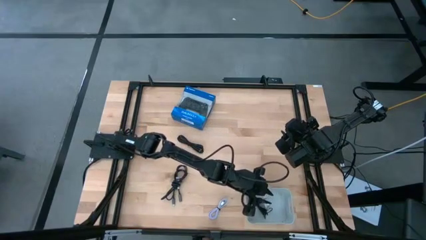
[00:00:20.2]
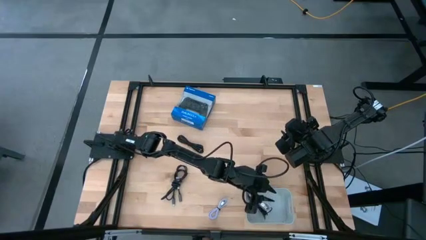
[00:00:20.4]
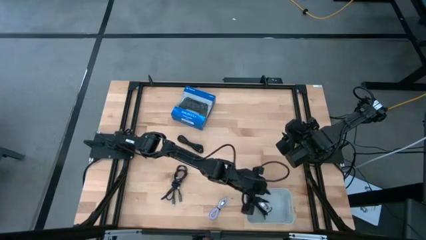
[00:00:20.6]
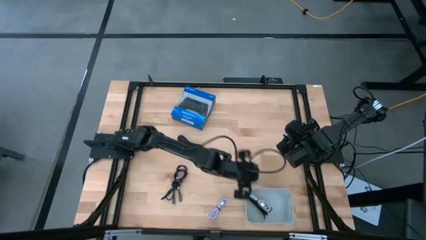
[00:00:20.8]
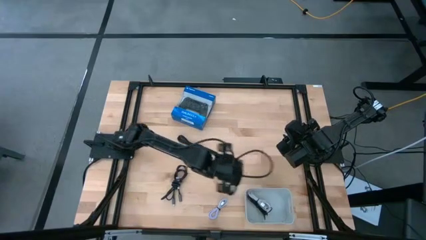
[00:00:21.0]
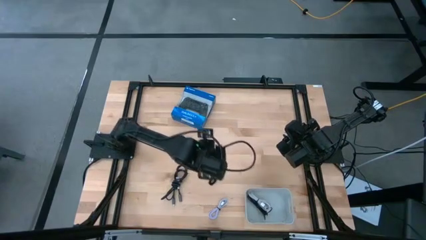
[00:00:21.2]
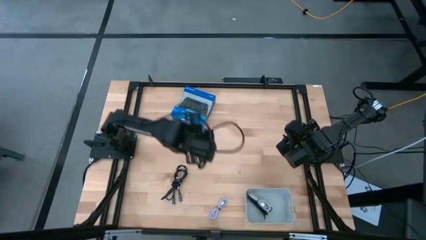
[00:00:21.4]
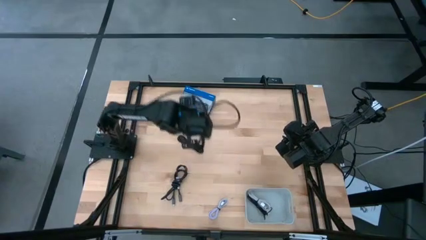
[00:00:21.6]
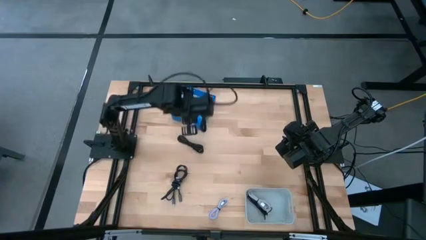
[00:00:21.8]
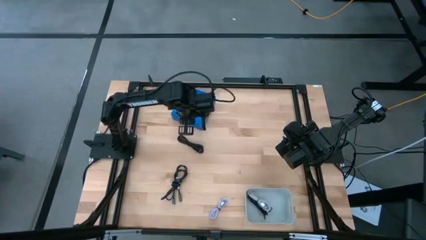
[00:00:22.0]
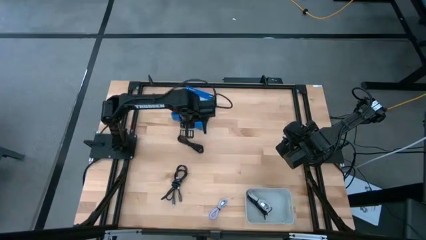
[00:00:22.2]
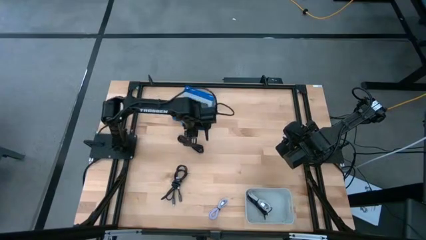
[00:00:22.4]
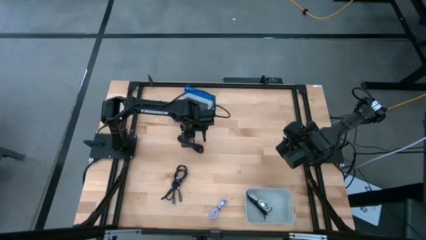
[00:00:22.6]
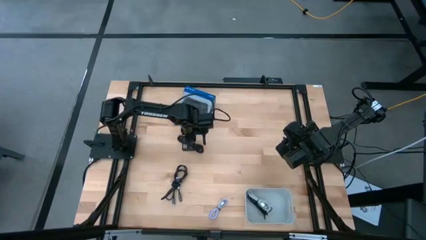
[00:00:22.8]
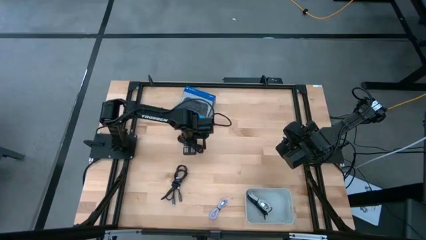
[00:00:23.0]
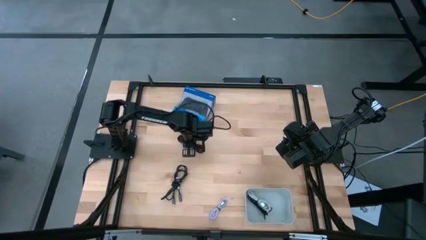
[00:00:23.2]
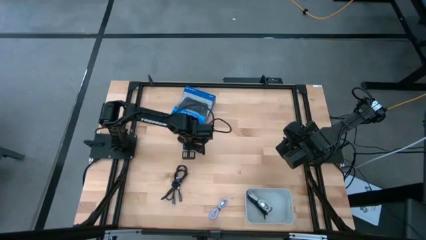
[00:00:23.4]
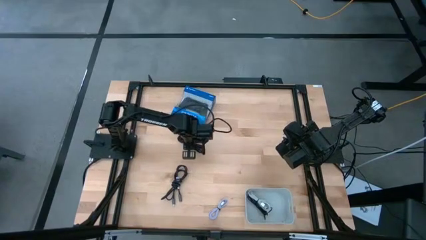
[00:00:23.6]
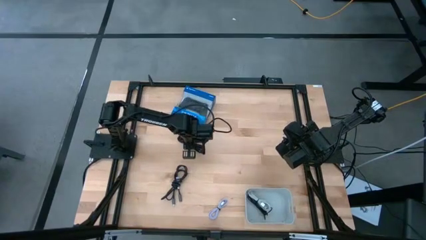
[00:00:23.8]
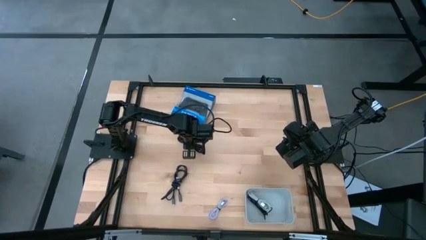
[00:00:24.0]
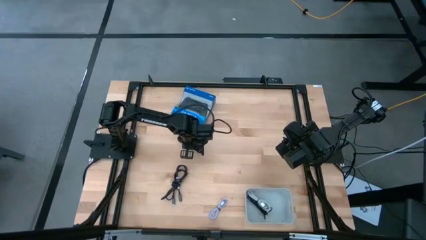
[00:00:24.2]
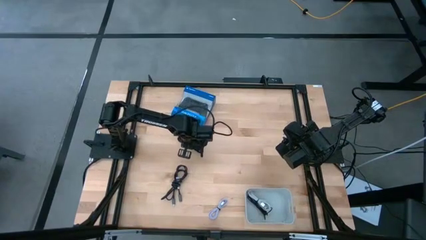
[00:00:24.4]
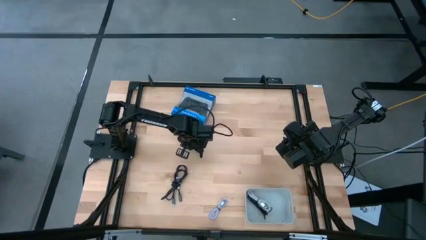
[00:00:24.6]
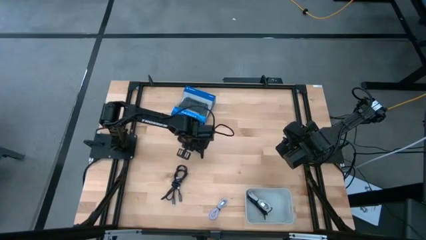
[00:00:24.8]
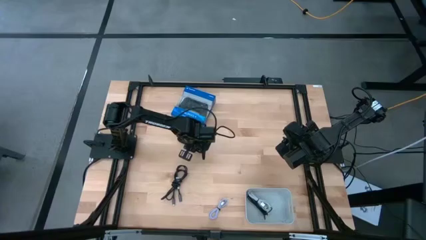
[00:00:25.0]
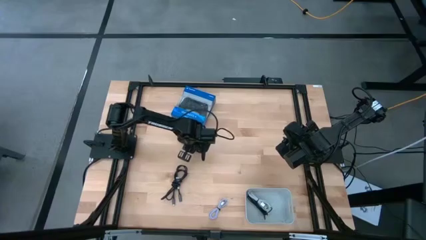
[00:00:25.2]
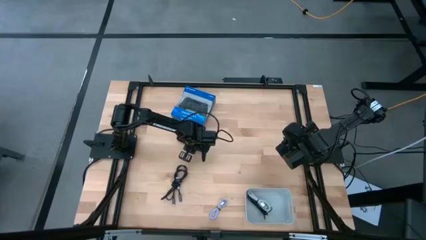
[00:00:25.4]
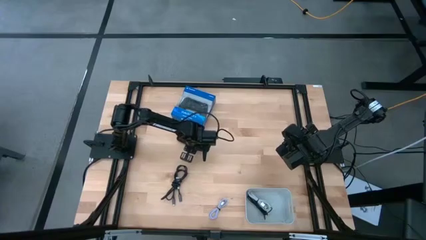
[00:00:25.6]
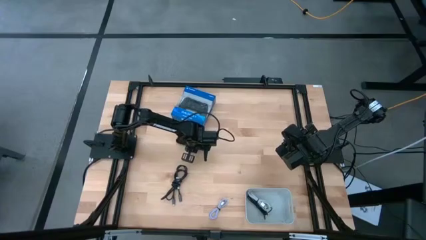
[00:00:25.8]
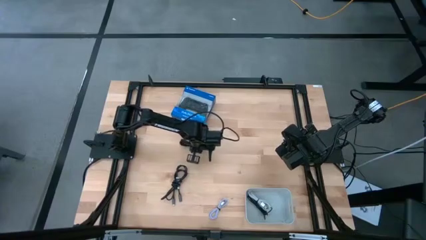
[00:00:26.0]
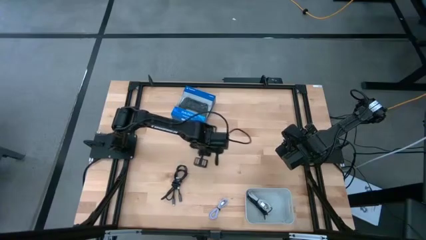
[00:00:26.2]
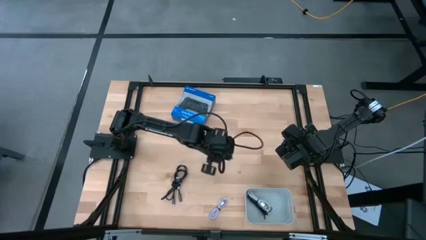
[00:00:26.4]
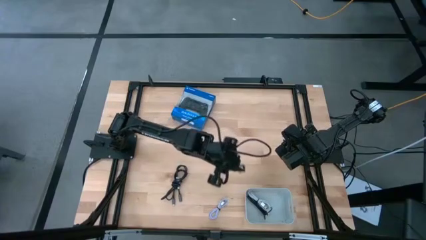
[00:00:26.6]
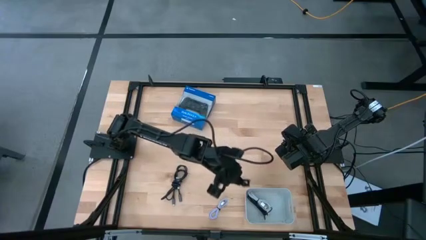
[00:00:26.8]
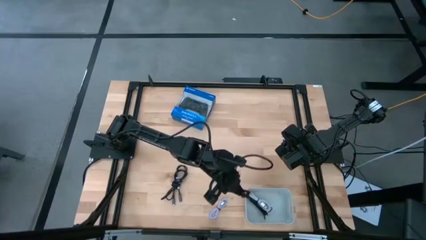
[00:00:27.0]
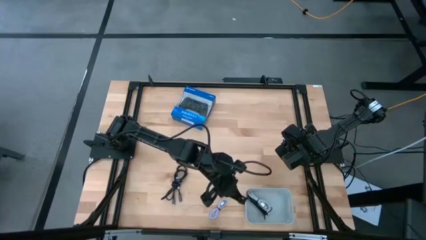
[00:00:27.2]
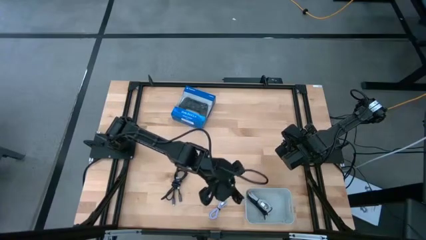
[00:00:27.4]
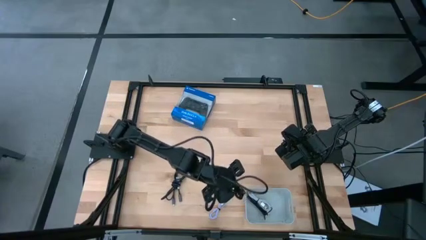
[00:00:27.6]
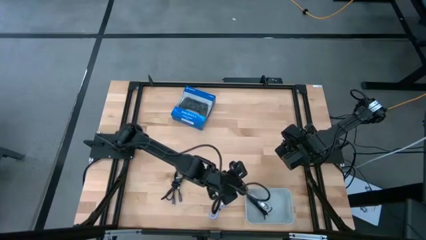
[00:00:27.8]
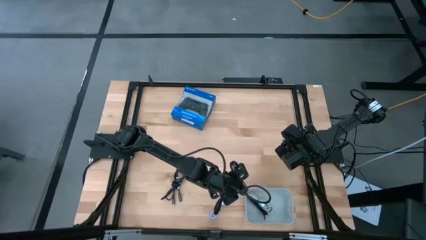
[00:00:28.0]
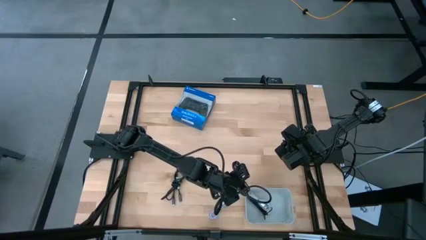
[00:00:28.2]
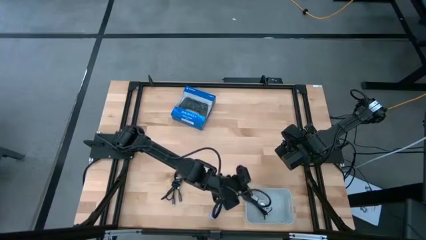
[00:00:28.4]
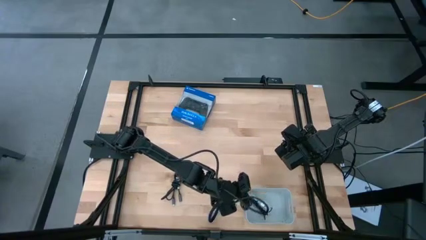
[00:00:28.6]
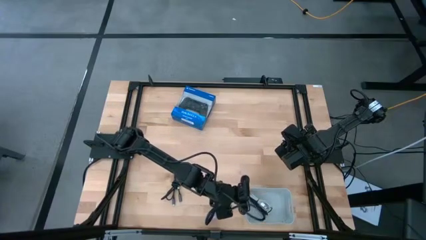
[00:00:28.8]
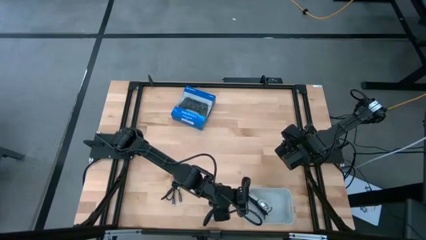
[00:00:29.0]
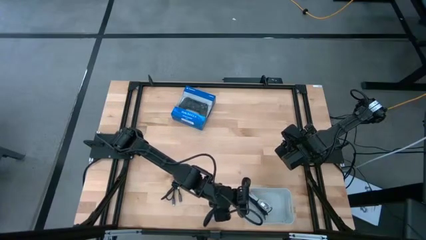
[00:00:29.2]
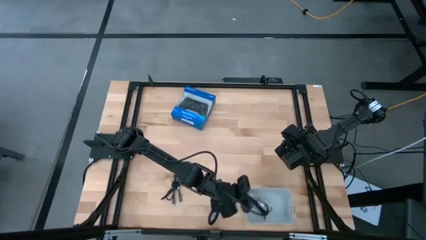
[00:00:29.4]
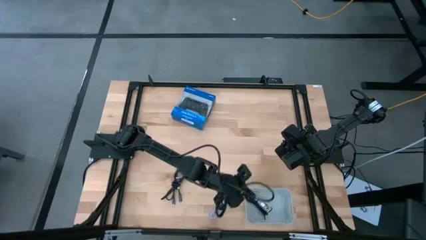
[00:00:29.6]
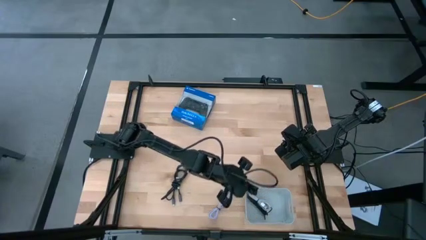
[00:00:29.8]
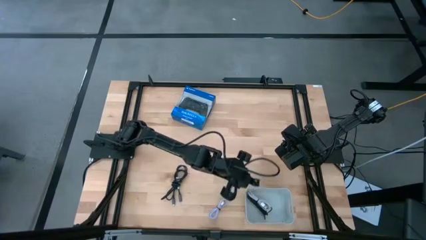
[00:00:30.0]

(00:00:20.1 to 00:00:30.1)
Task: Pick and place USB-C Cables
Put the top black charger cable into the white bin

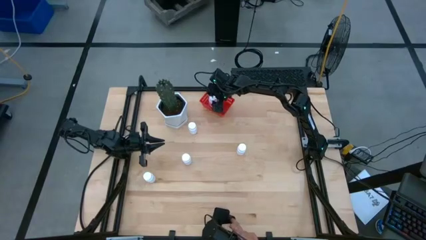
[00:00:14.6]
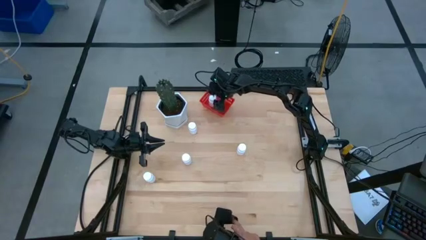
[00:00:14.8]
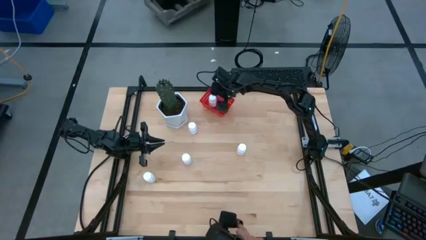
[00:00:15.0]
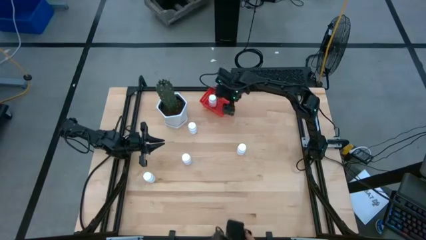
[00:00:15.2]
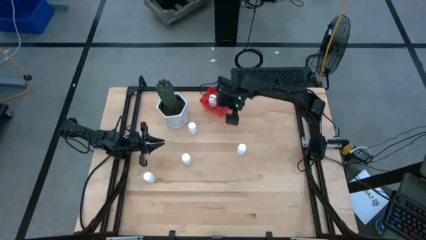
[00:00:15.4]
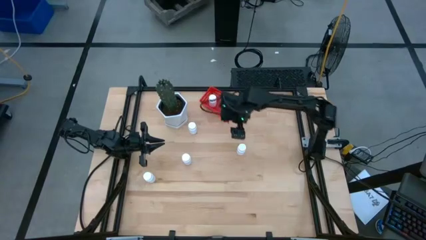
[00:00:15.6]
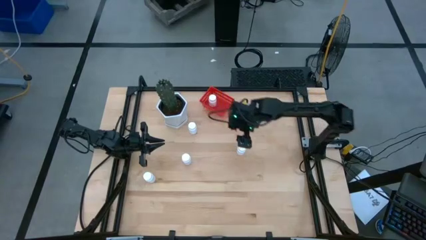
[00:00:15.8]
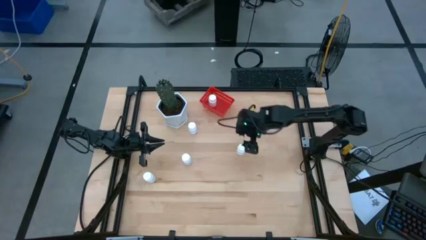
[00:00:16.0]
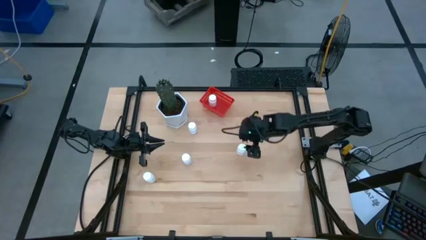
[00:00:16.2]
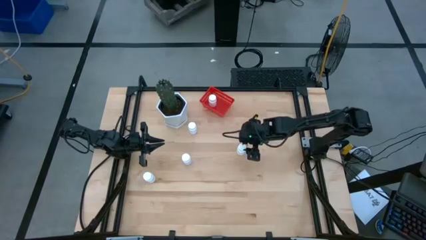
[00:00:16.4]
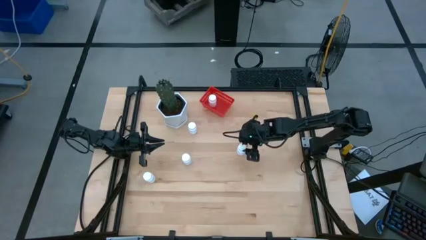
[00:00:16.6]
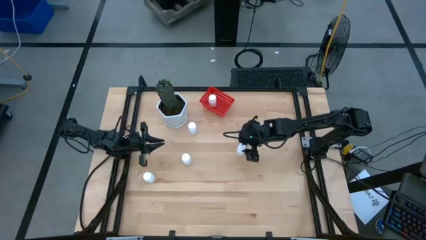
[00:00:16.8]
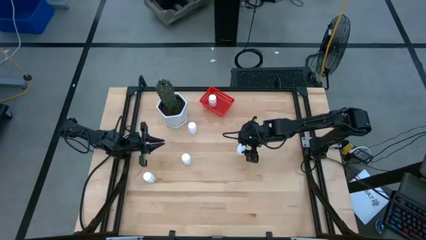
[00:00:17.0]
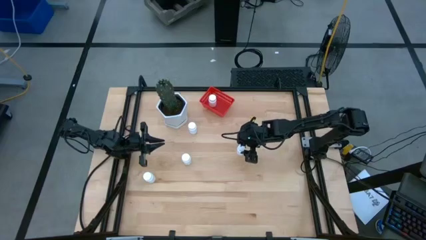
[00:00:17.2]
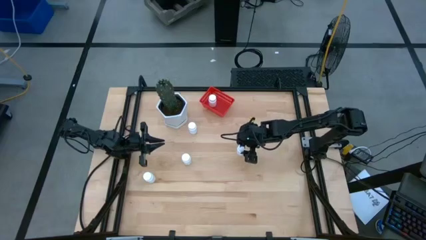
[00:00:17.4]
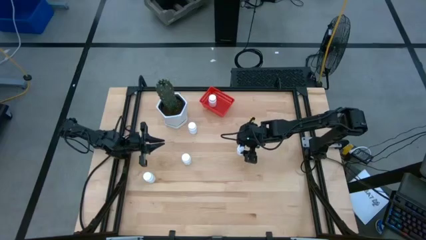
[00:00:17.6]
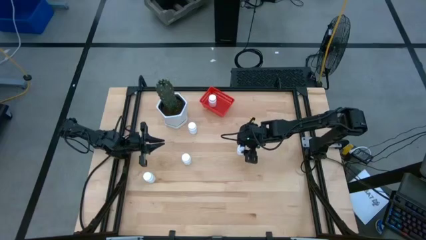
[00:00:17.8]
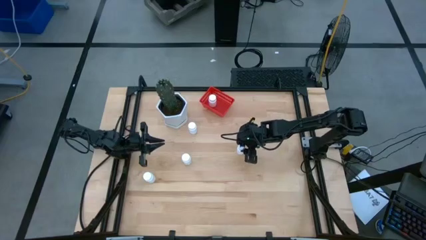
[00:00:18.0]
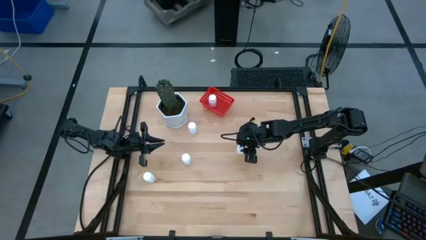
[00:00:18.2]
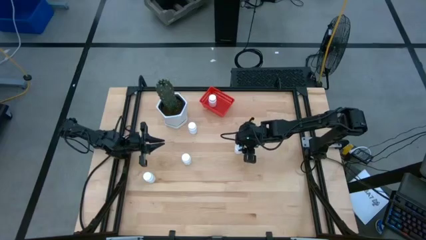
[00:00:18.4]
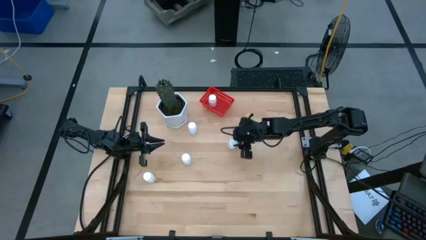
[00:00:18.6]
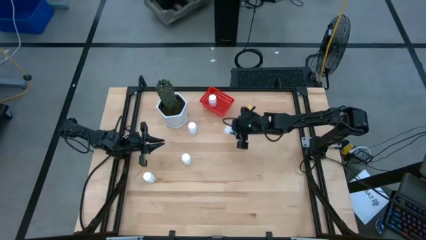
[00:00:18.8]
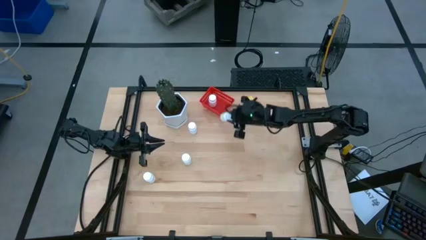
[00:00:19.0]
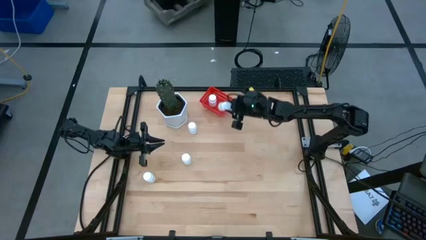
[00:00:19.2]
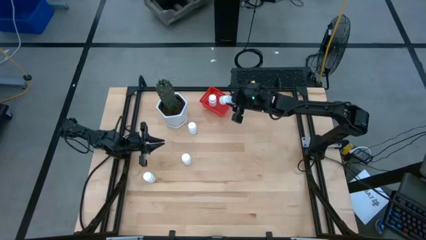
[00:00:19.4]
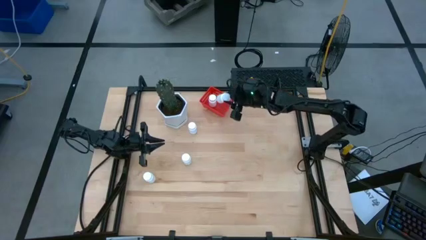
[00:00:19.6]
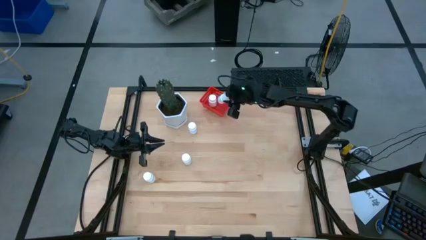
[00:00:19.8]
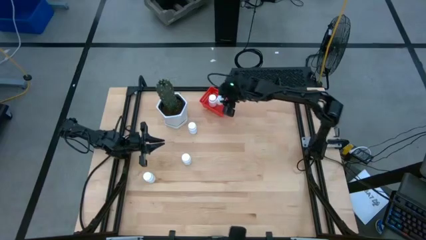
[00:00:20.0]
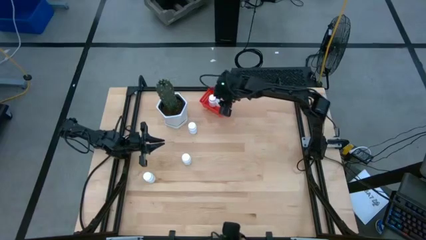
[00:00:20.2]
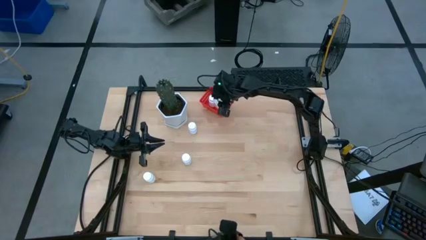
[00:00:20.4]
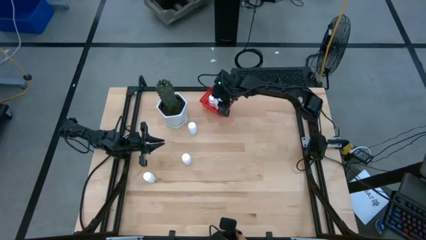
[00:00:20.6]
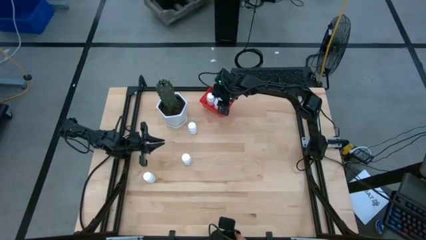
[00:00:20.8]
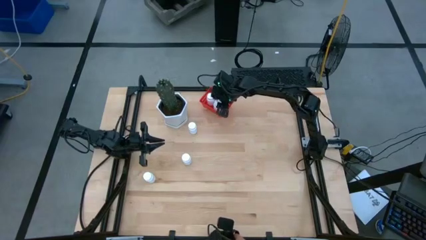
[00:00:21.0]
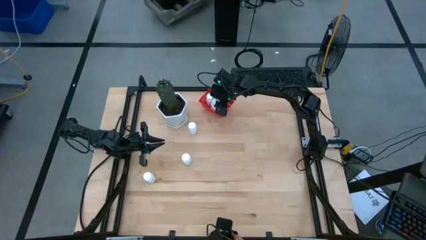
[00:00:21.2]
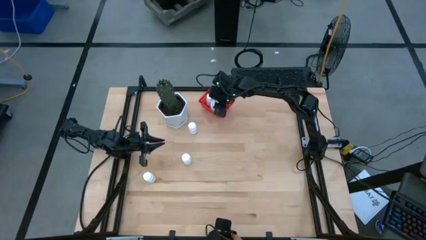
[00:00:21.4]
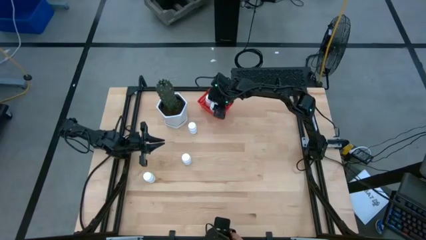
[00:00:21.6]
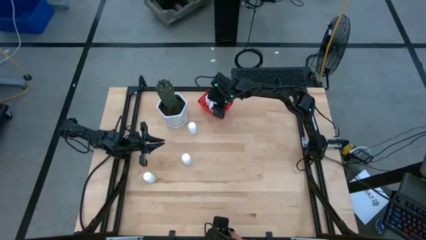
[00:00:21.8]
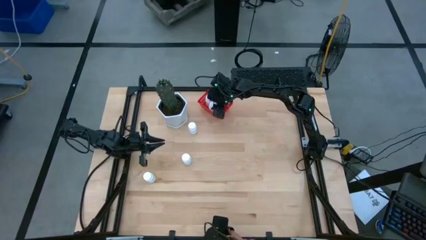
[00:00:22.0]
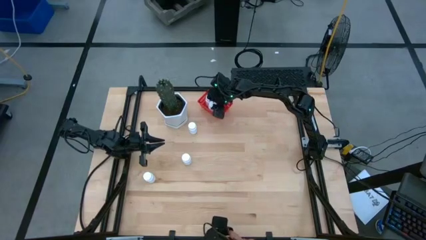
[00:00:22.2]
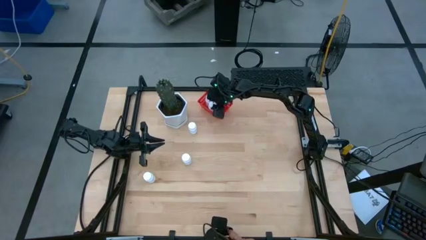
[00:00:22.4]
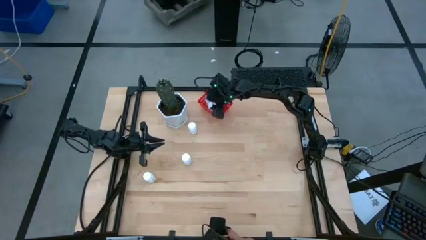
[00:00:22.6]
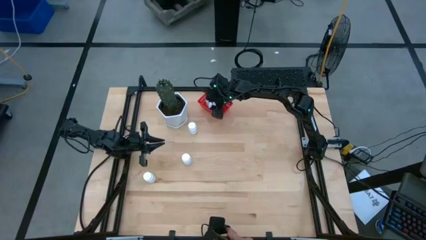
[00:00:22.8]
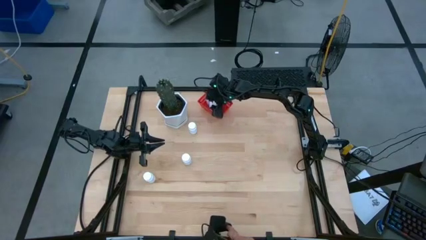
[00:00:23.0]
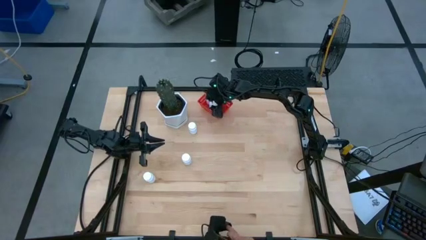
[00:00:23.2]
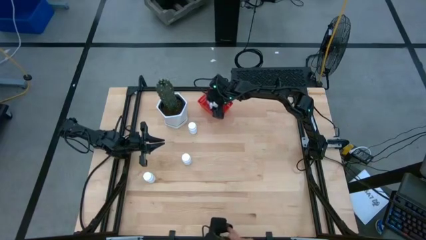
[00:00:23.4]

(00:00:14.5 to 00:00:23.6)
Task: Pick and place pill bottles into a basket
Put the white pill bottle into the red bin
